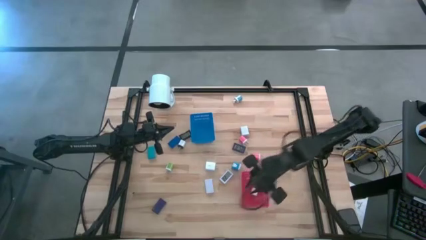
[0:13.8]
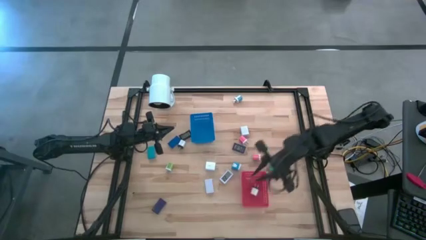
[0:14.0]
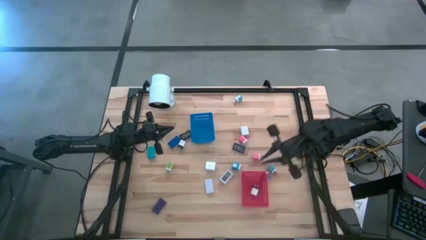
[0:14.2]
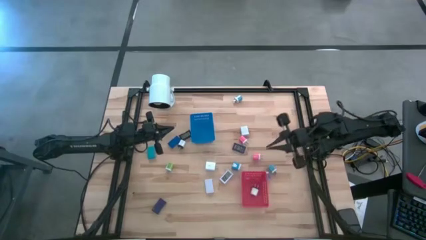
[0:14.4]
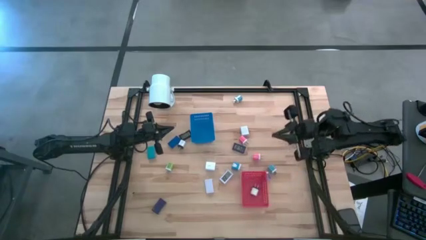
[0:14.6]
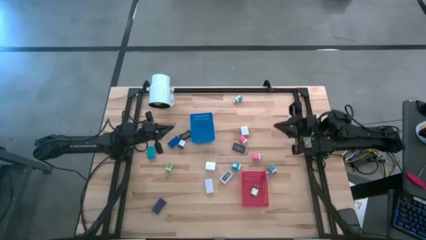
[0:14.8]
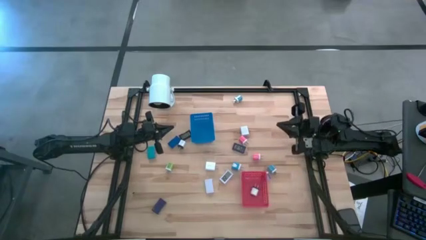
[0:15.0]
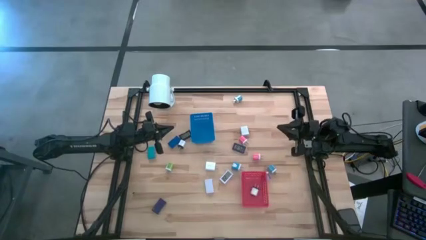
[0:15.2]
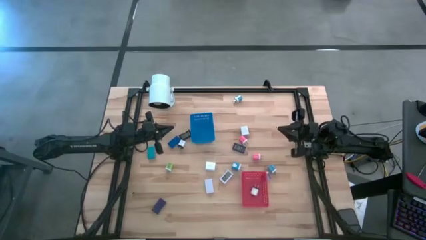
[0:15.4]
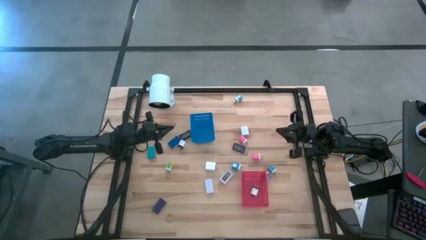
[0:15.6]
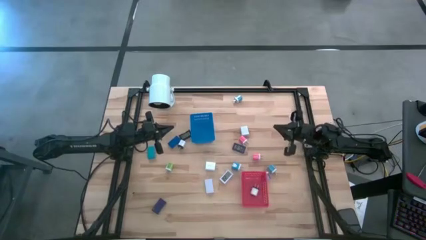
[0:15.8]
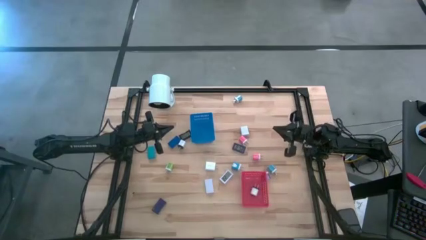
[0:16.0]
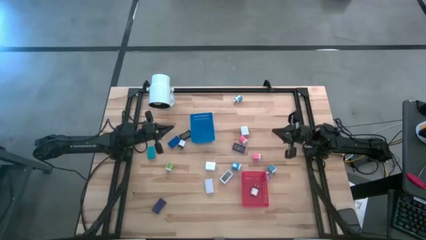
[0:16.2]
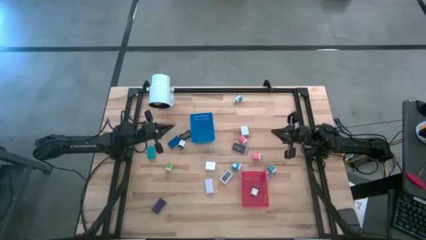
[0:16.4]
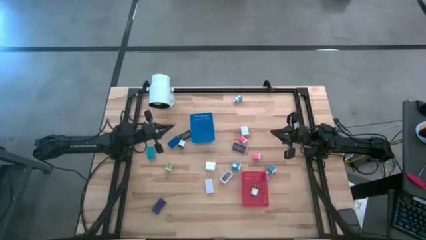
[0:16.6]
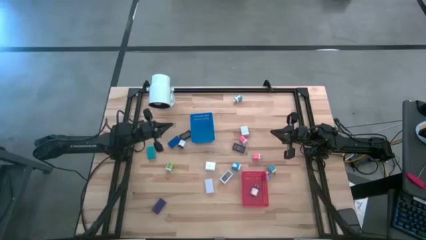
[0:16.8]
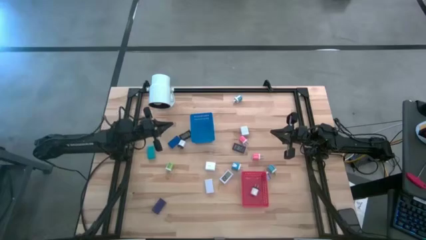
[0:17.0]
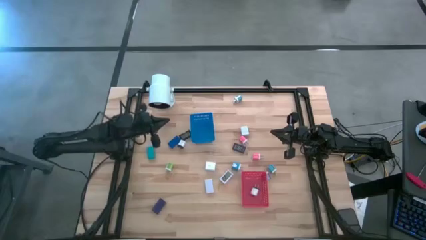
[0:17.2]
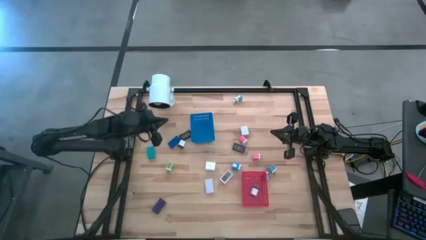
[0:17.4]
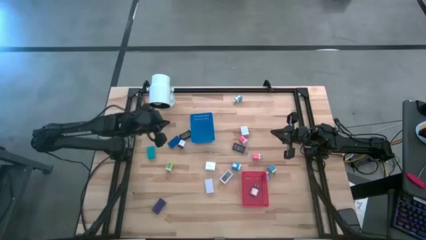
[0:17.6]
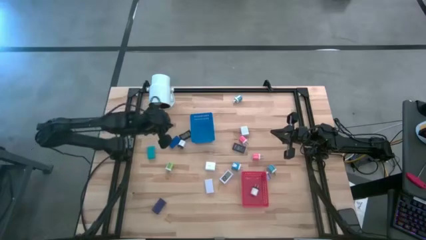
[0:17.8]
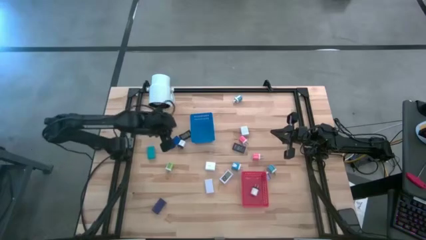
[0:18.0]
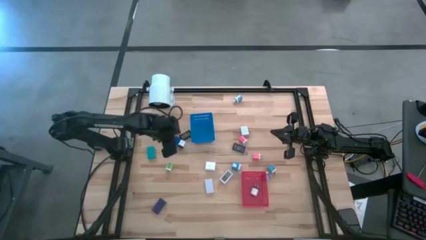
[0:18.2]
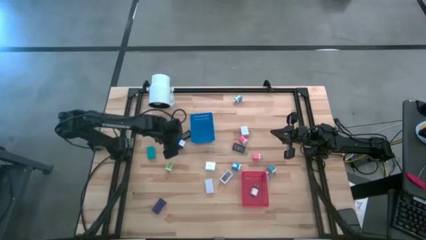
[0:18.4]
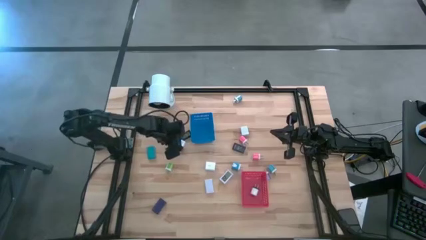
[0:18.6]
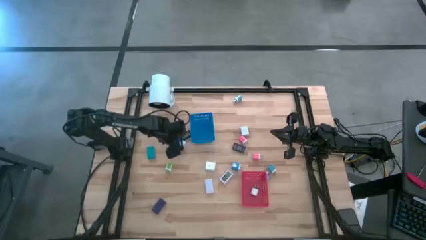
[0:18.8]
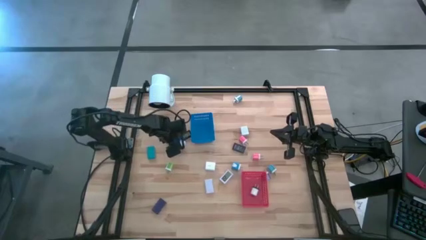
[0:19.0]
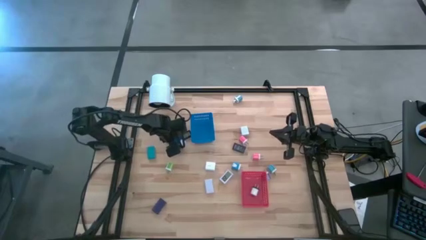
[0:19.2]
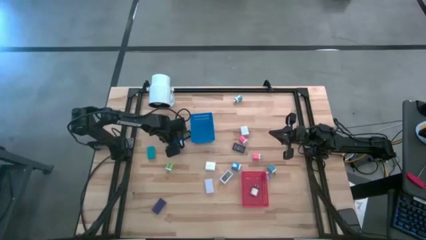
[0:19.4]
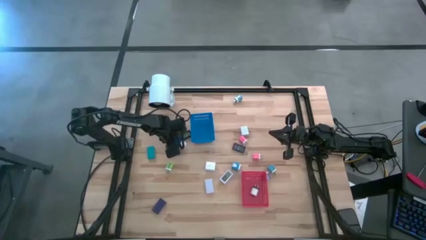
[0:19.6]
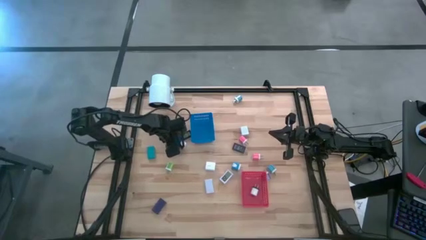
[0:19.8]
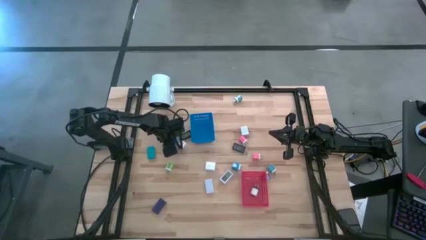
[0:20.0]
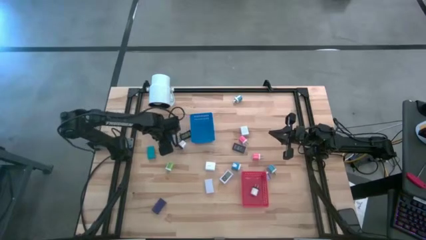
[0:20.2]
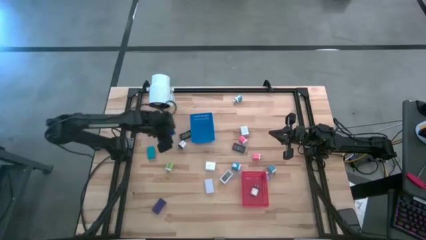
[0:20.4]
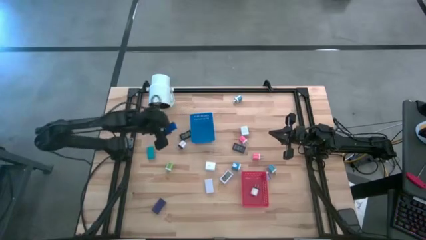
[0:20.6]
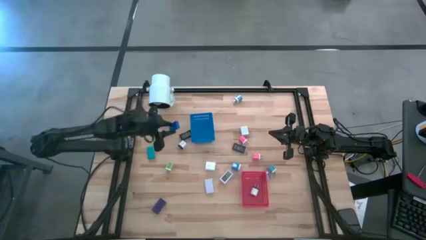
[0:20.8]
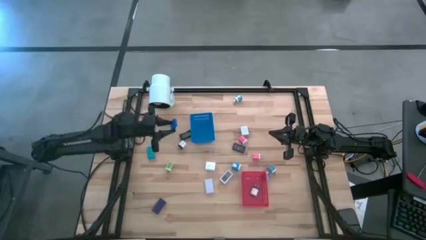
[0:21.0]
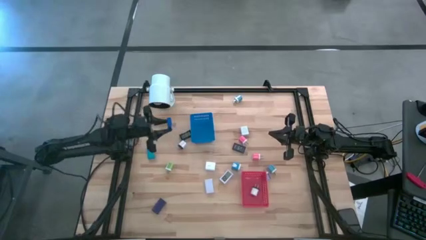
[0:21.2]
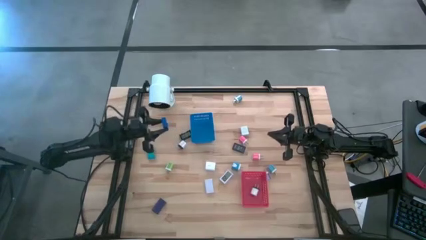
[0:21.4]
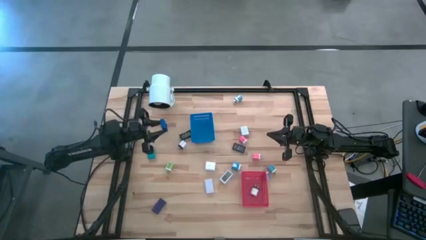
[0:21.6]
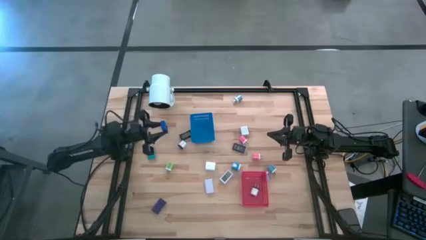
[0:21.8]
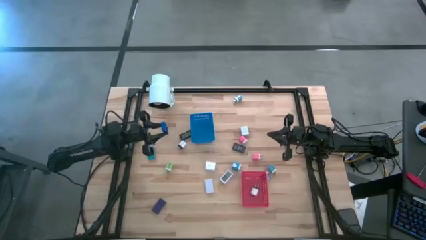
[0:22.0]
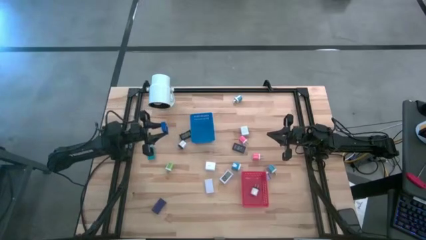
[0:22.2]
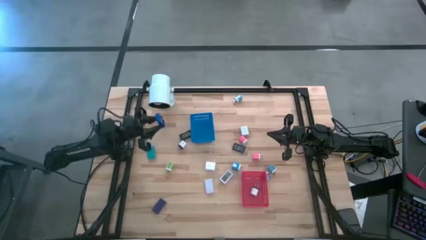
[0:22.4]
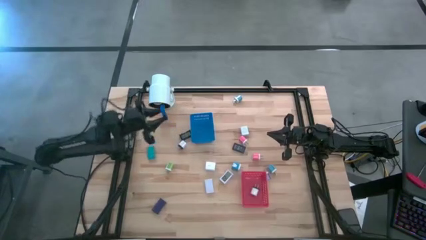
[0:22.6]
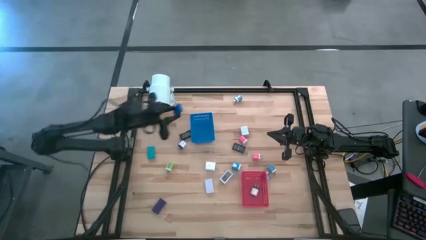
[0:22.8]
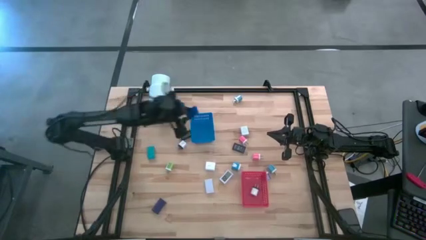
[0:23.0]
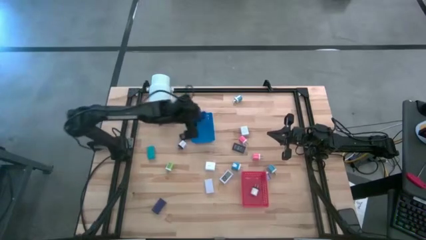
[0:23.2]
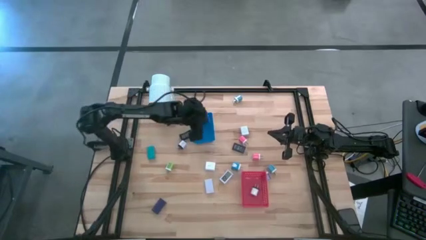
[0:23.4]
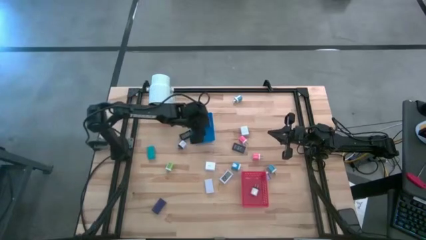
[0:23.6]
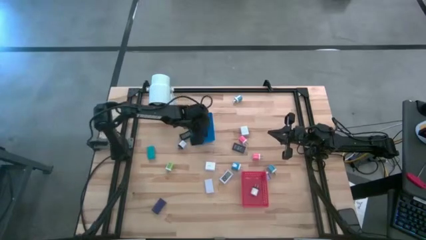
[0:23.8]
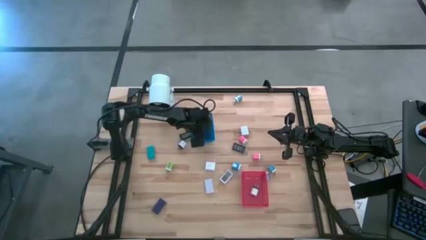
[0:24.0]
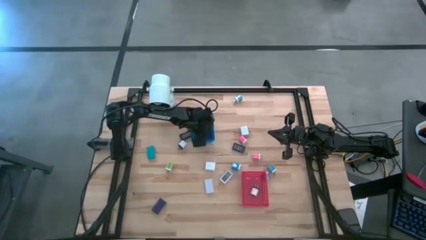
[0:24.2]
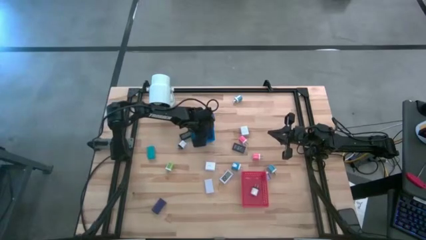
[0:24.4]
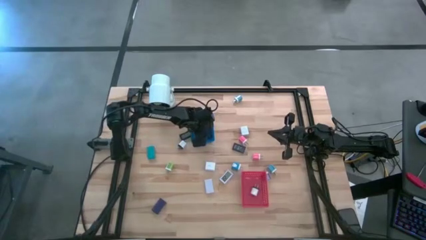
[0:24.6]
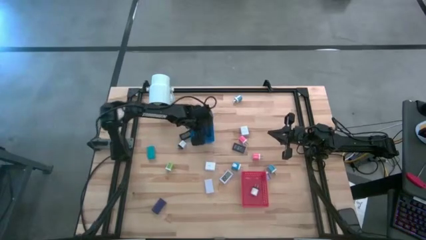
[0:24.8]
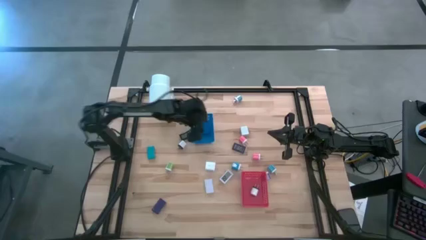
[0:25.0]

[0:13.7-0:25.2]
Task: Pick & Place Office items
Put the blue digital clock into the blue bin
